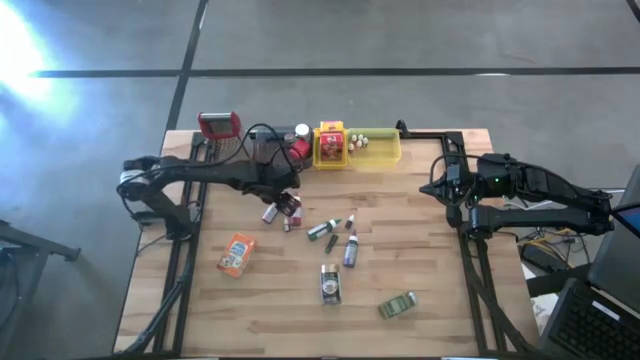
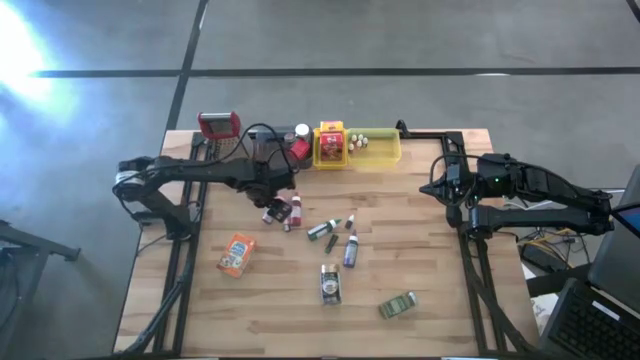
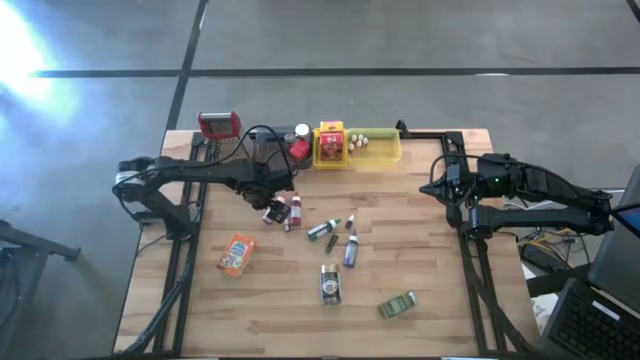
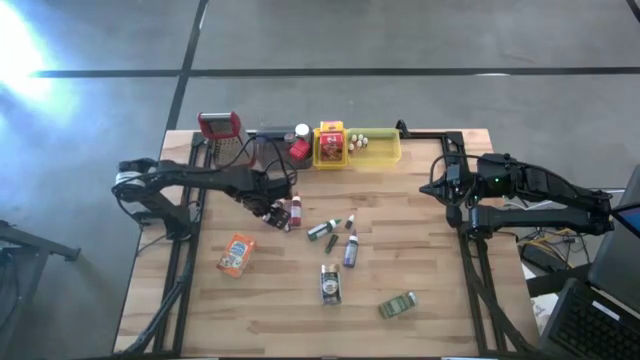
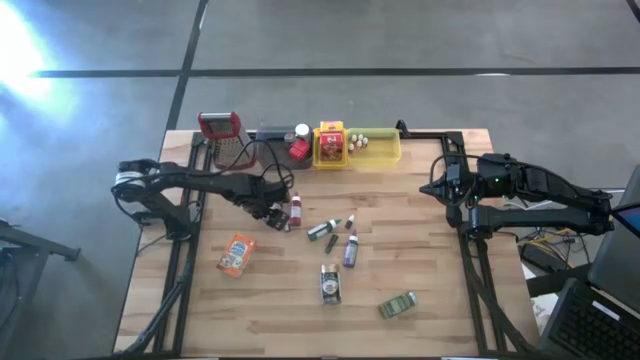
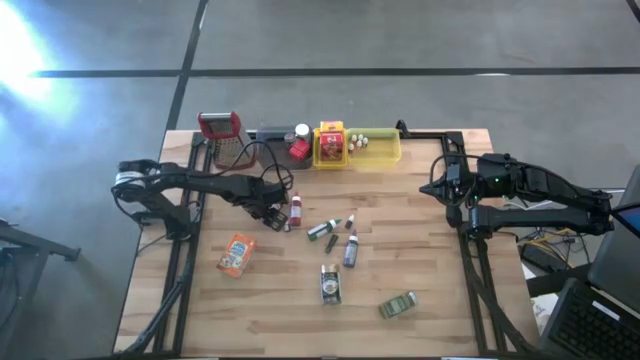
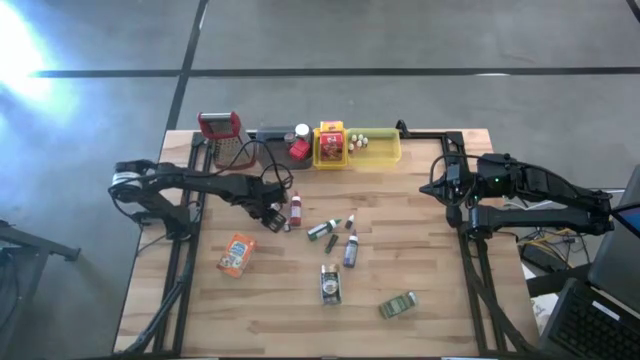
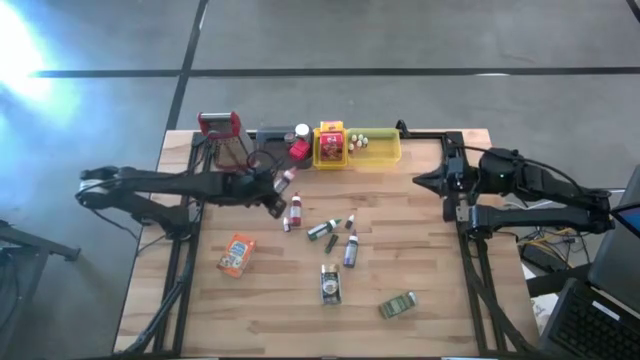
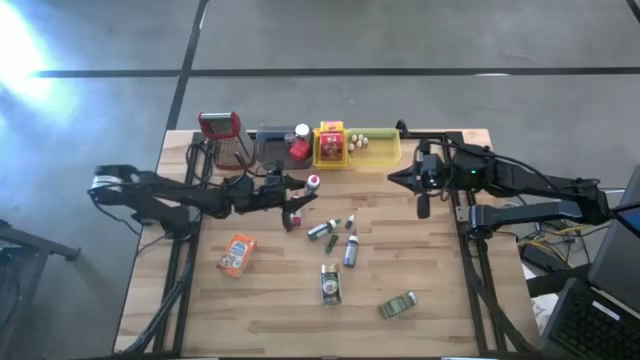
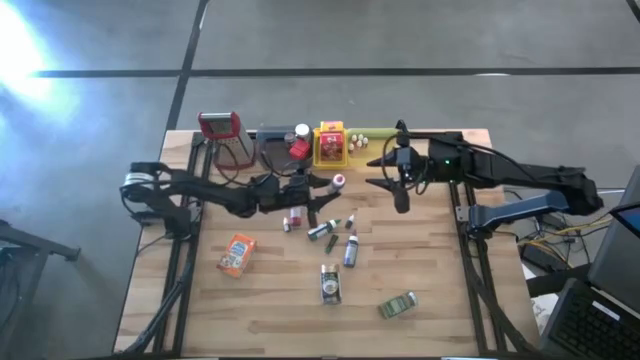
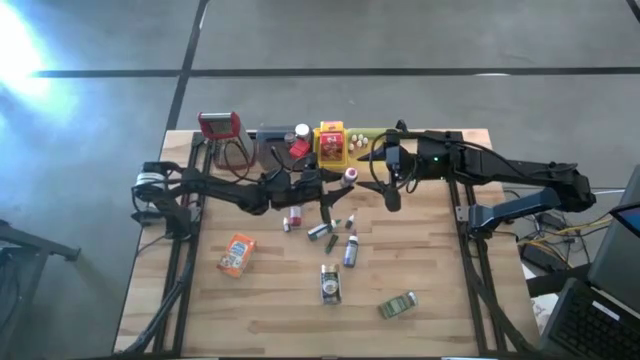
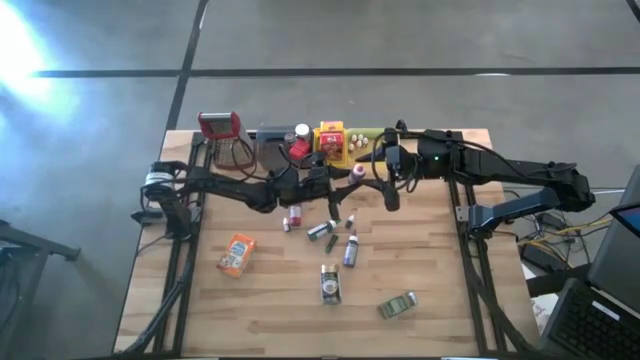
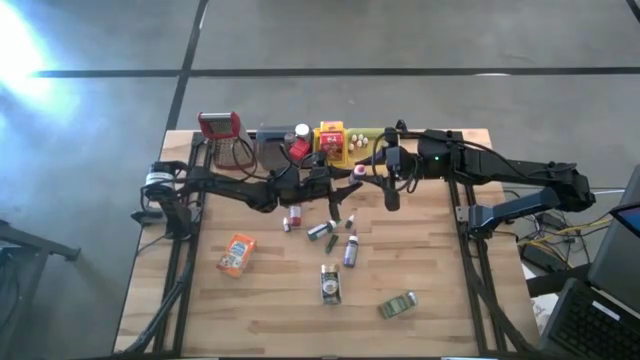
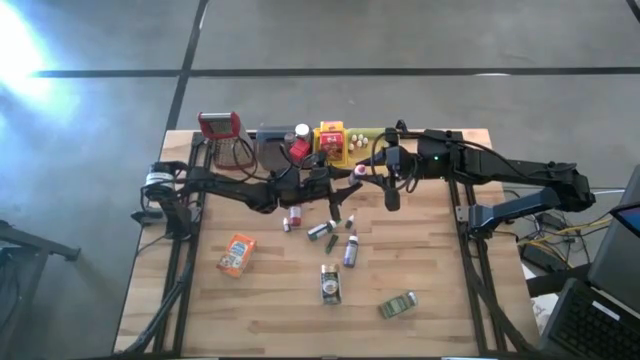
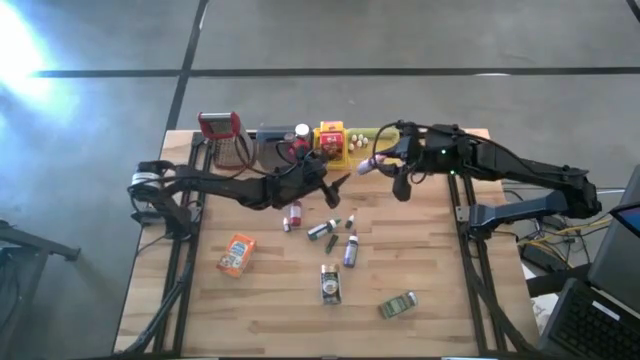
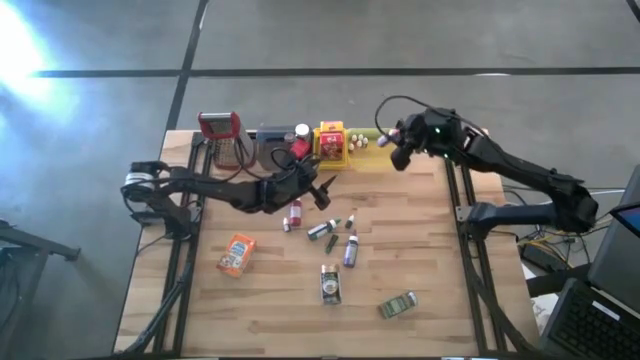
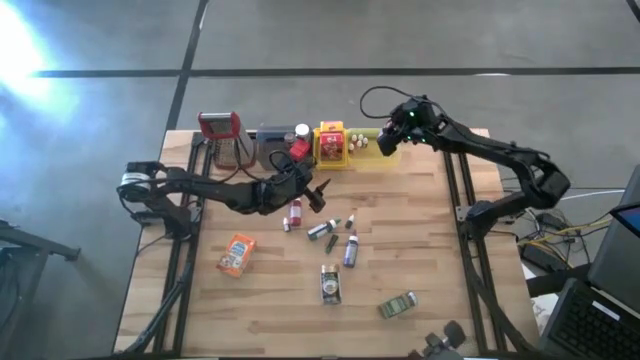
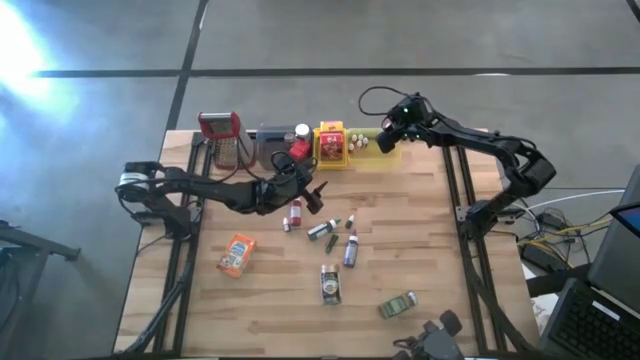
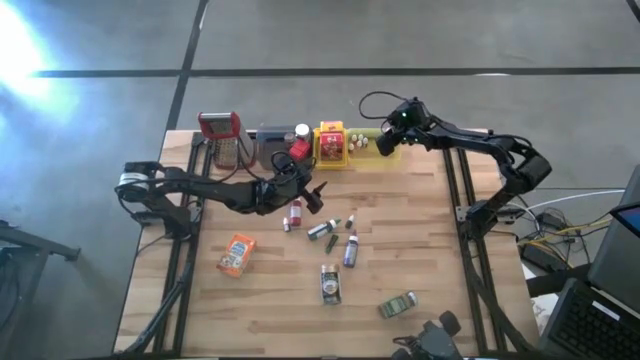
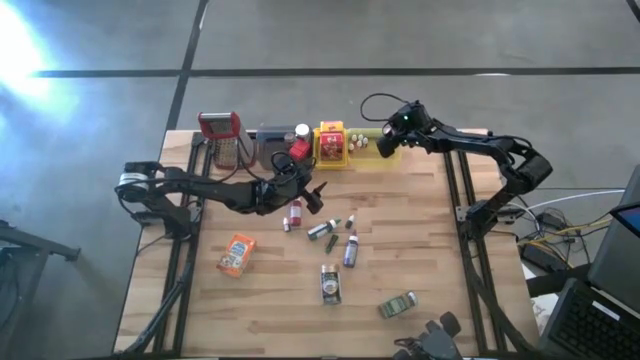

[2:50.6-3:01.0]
Task: Pick & Place Kitchen Items
Put the large pink food coloring bottle into the light yellow bin

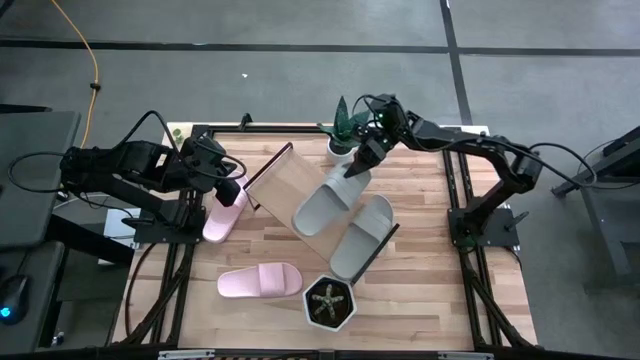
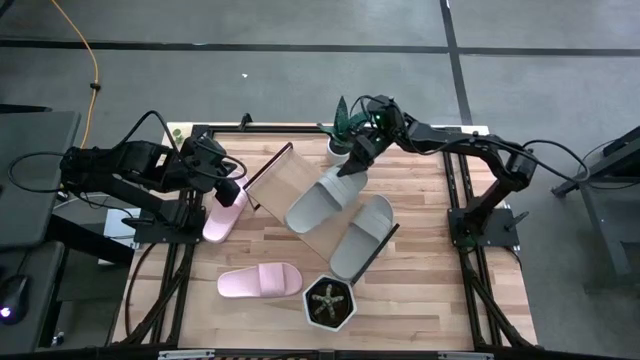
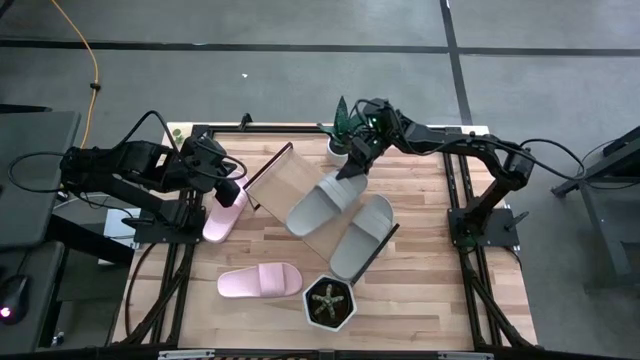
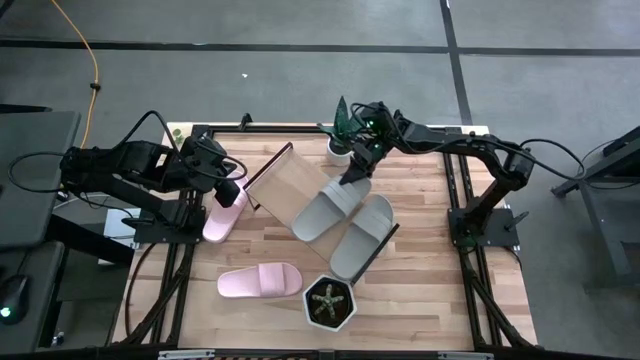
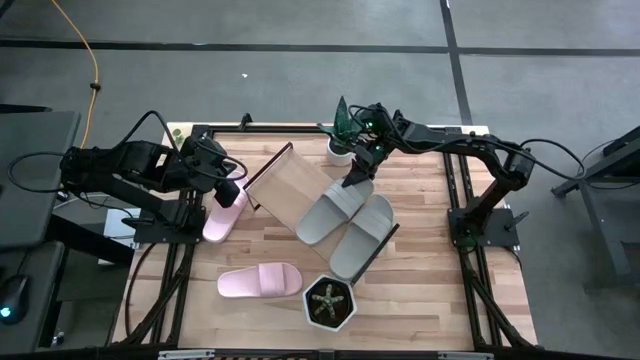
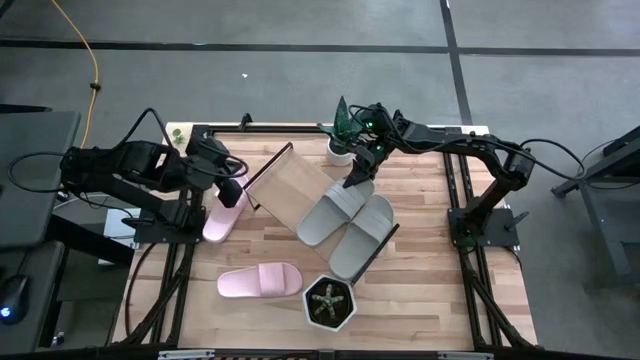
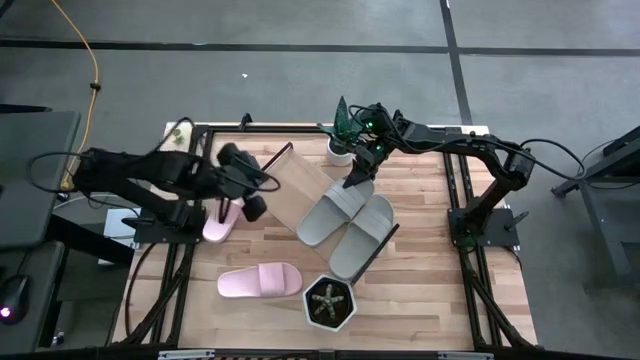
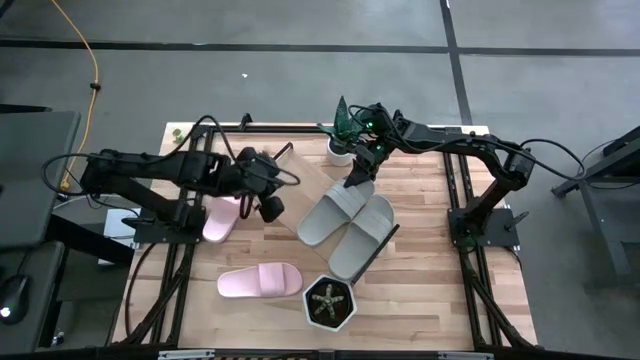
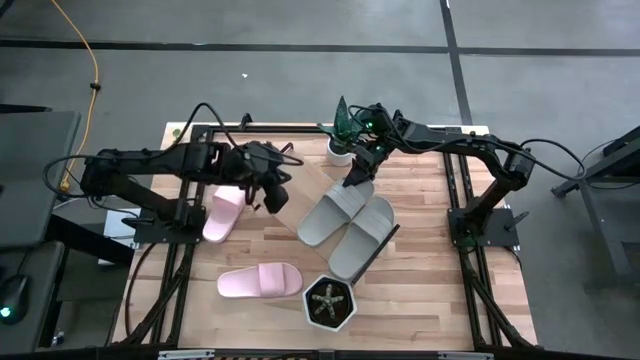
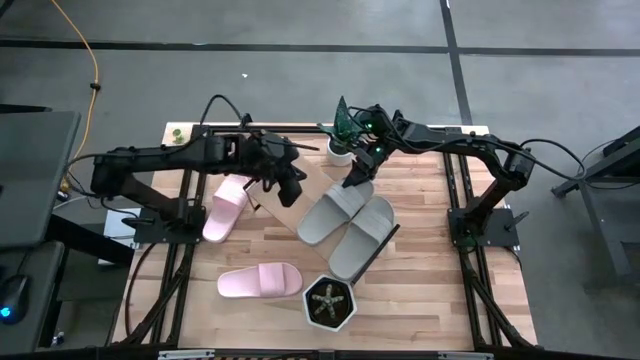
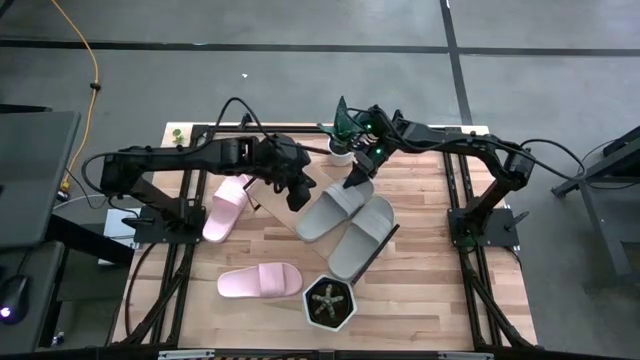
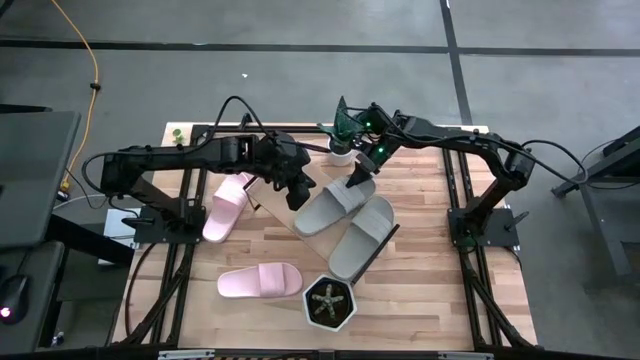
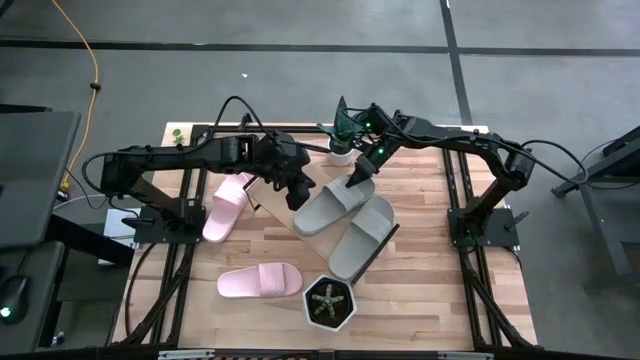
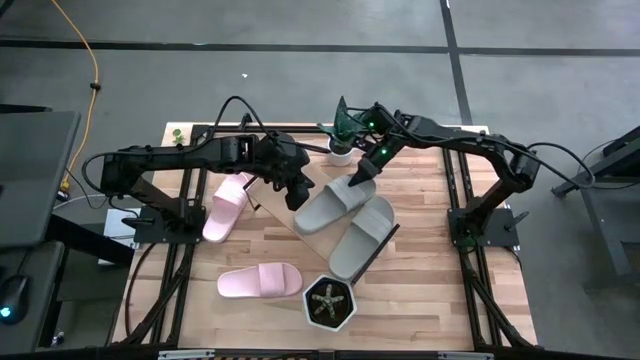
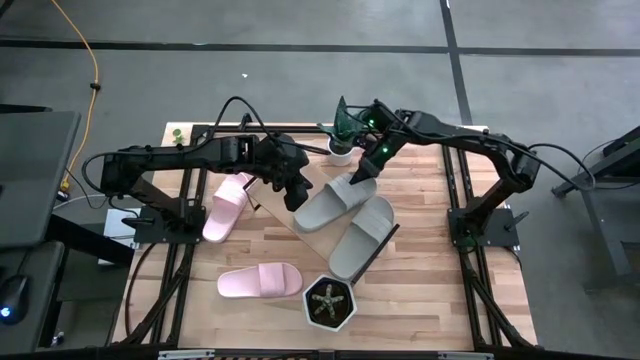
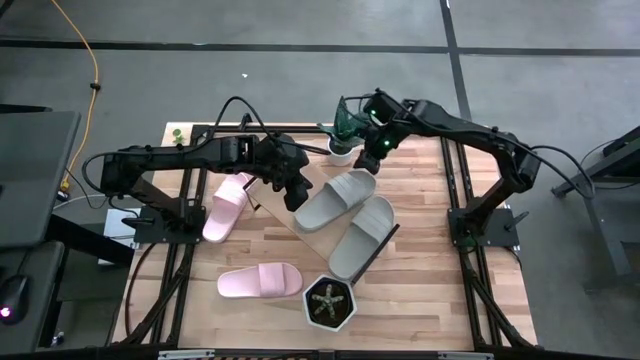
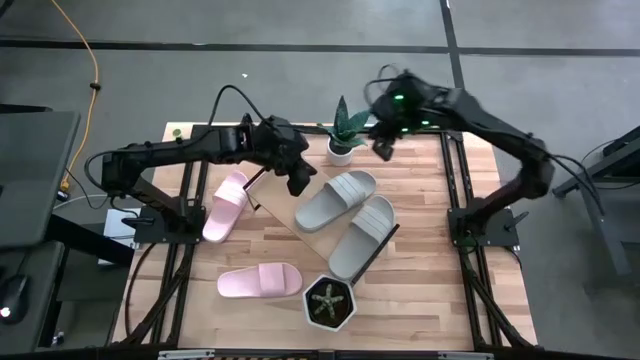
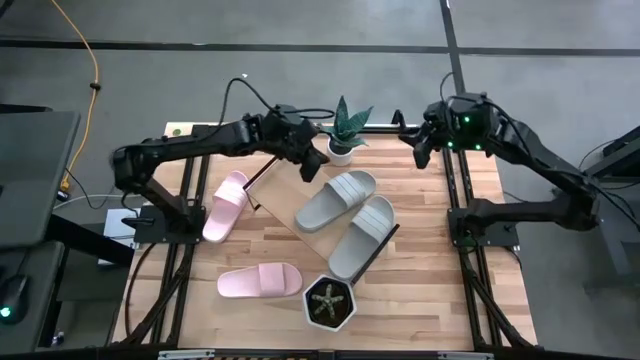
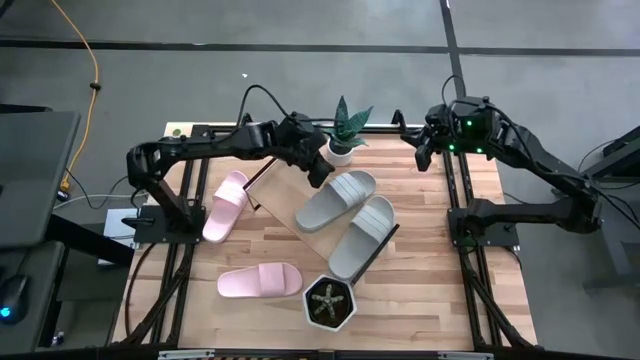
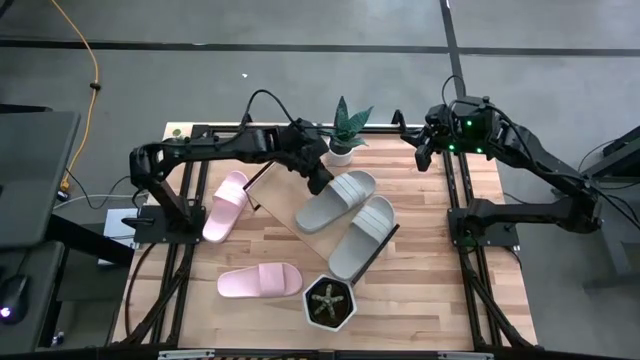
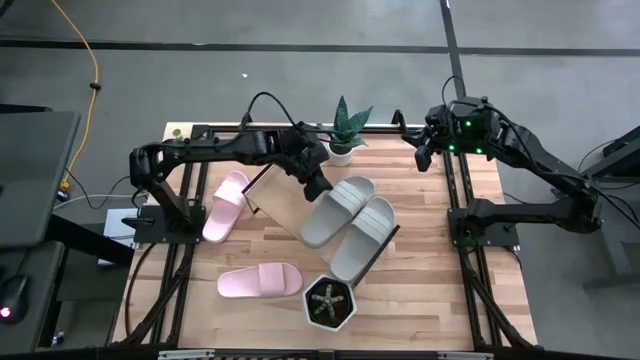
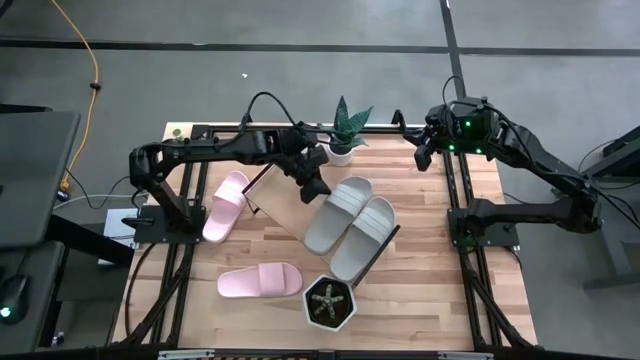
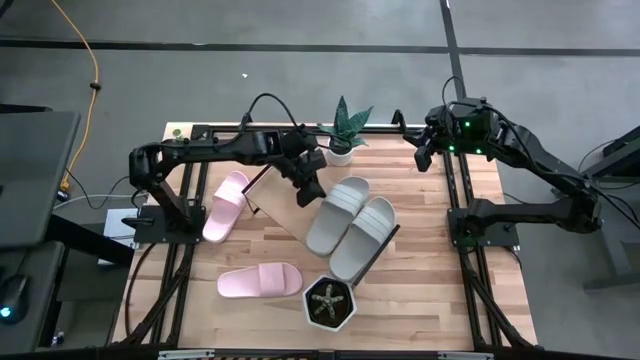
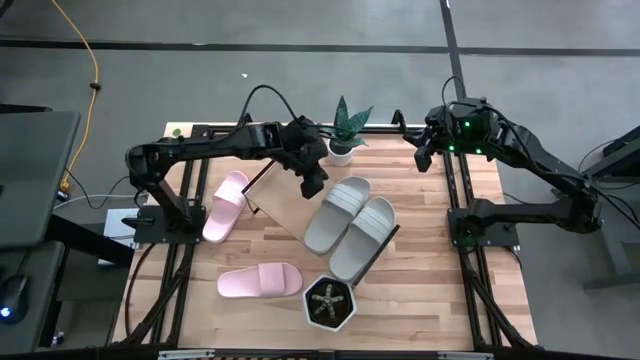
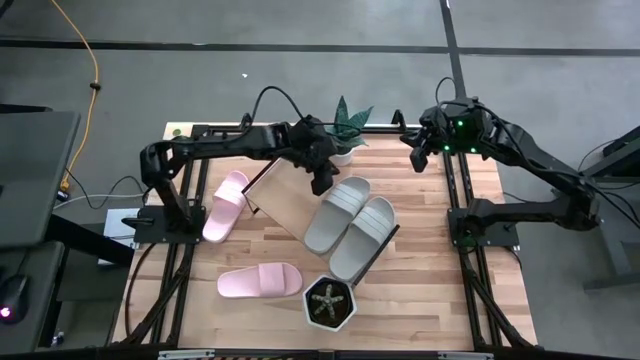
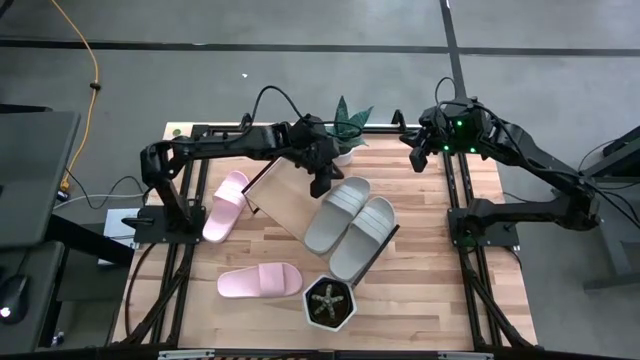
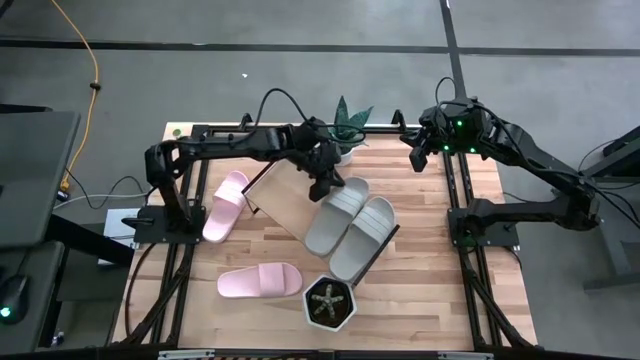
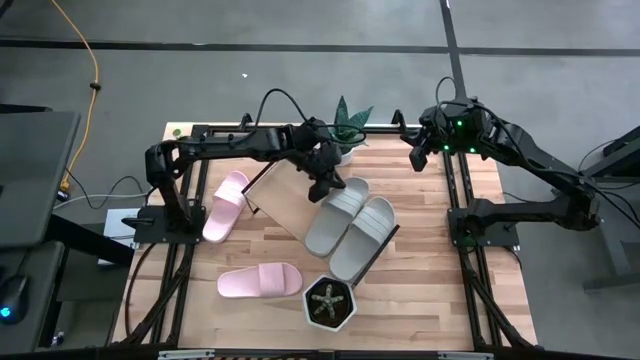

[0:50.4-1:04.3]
Task: Pick and place slides into the shelf
Put the gray slipper on the shelf
